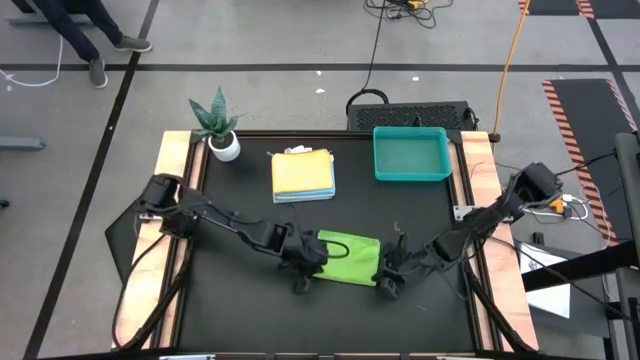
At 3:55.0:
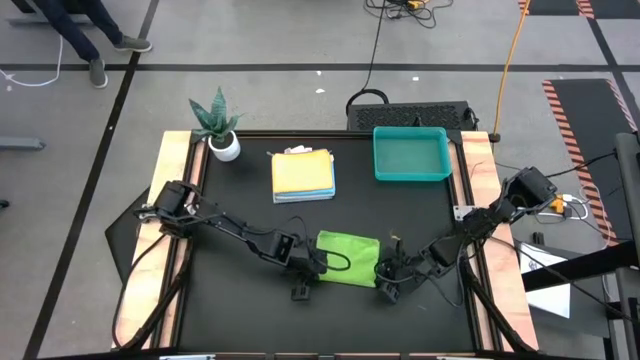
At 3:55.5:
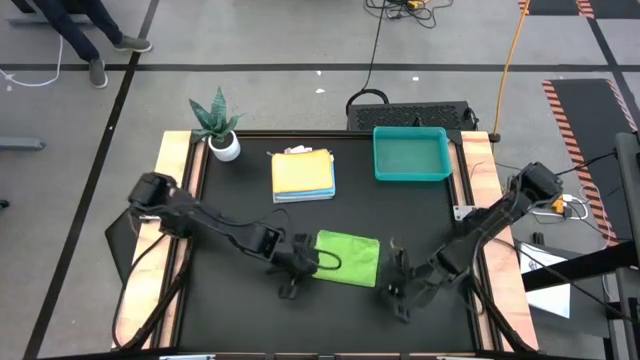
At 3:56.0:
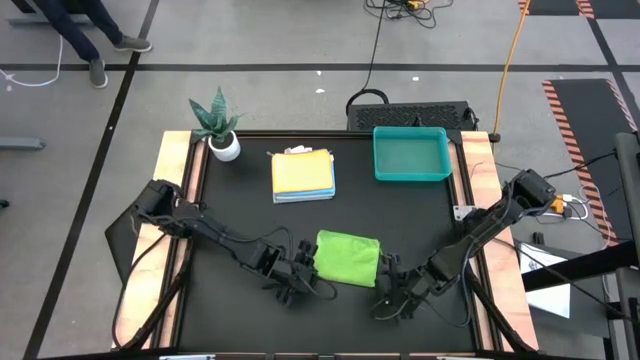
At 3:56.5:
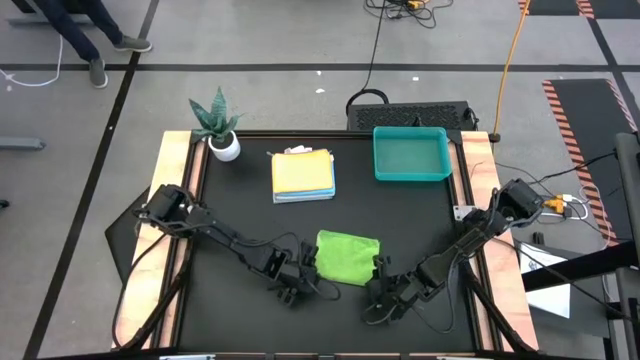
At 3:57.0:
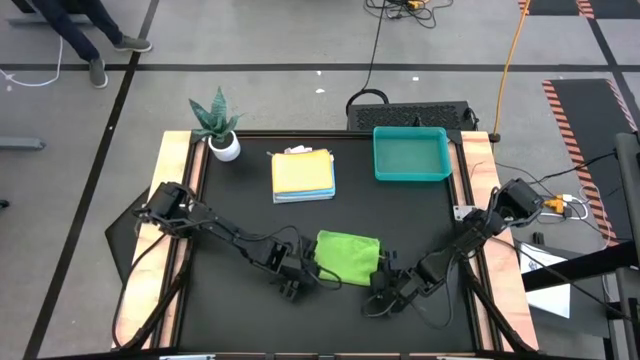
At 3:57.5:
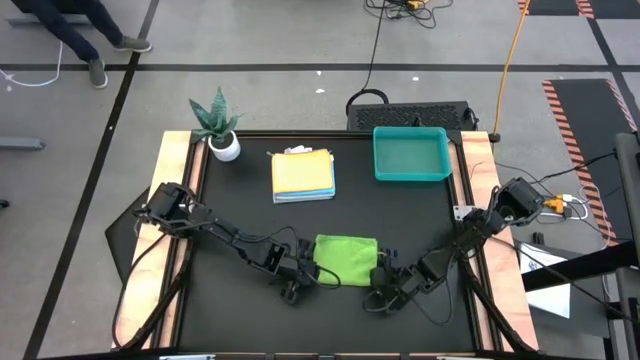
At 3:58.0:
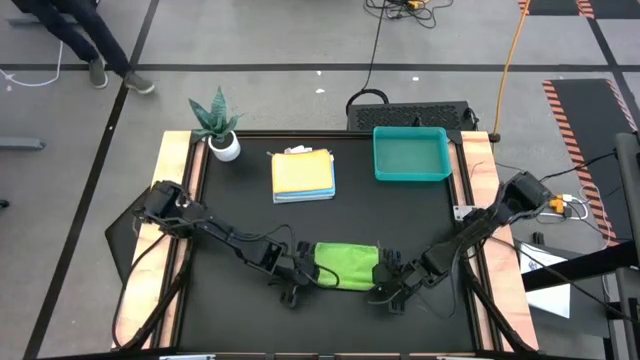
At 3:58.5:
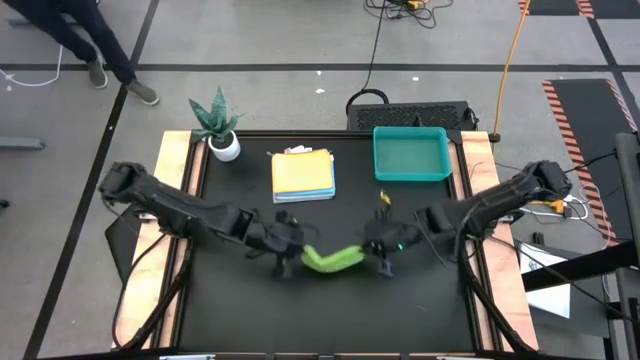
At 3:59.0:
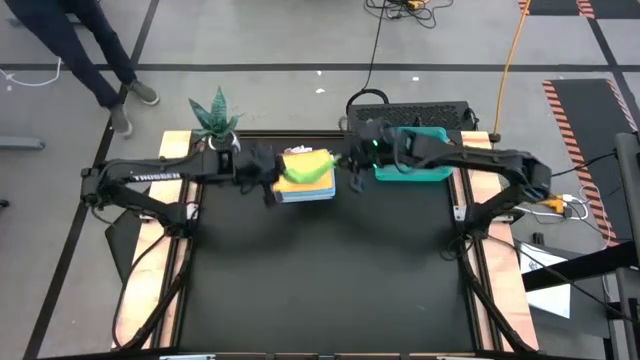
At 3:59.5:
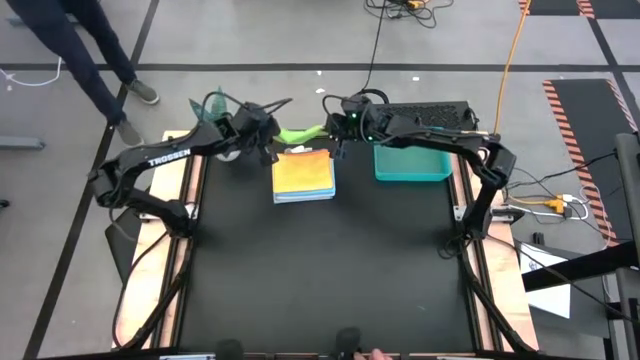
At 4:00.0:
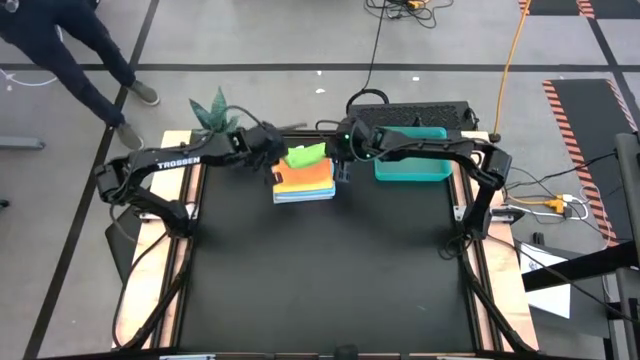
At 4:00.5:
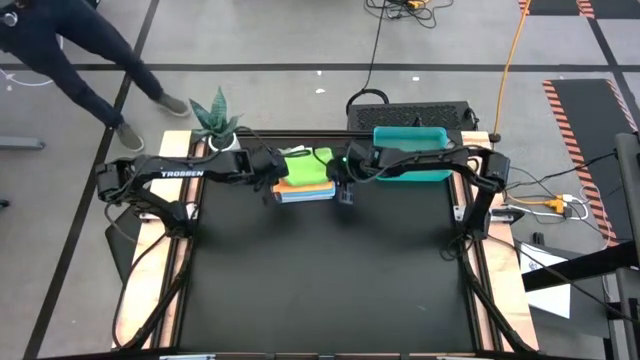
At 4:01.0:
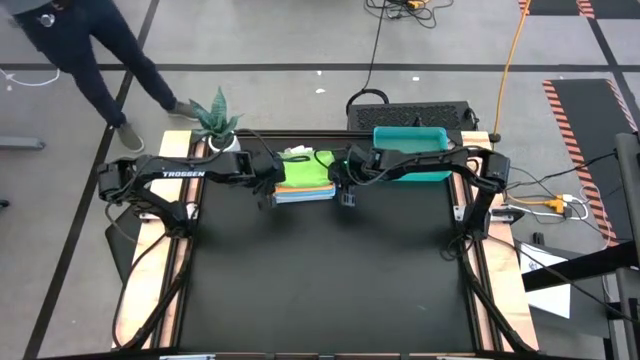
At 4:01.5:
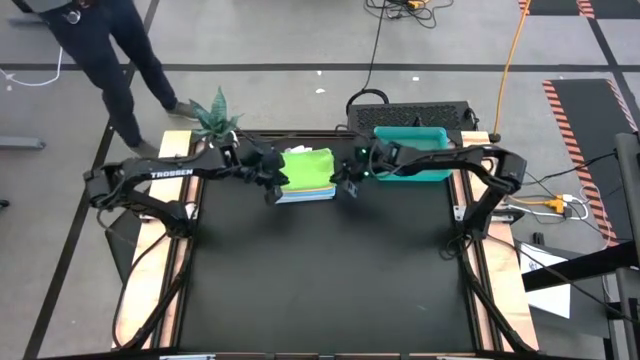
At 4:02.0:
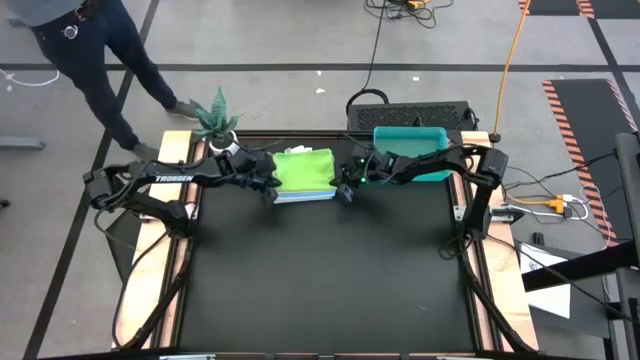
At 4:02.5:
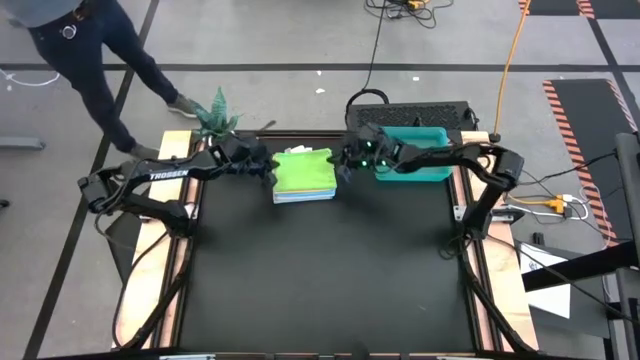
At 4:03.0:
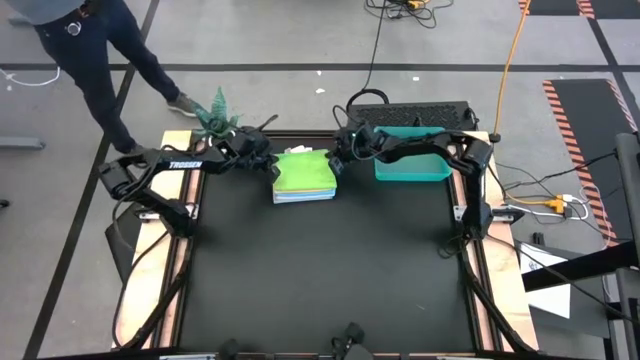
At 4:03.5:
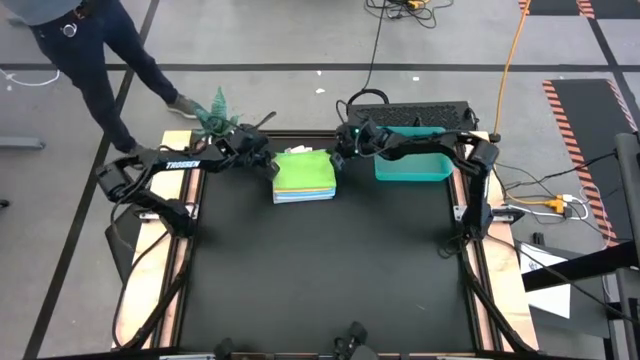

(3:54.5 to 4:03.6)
Task: Fold microfiber towels
Stack the green microfiber towel on the yellow microfiber towel

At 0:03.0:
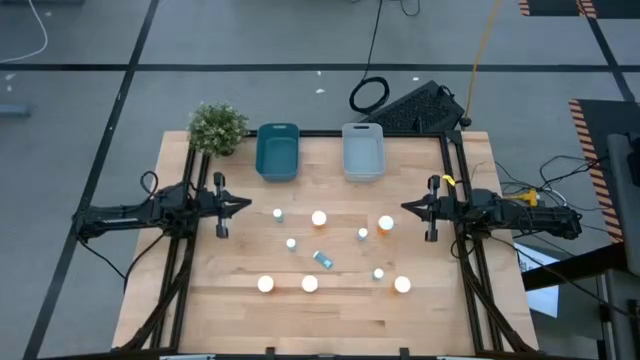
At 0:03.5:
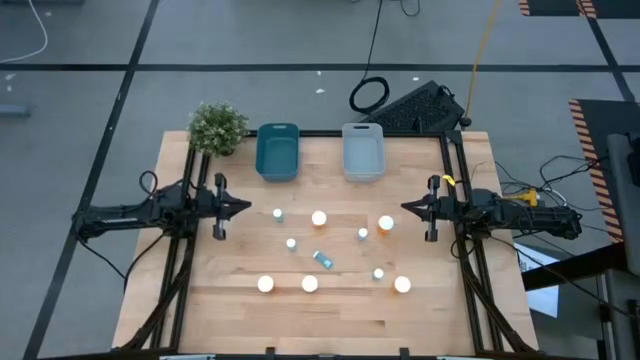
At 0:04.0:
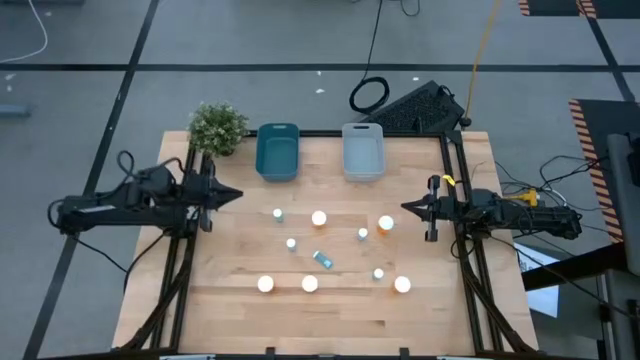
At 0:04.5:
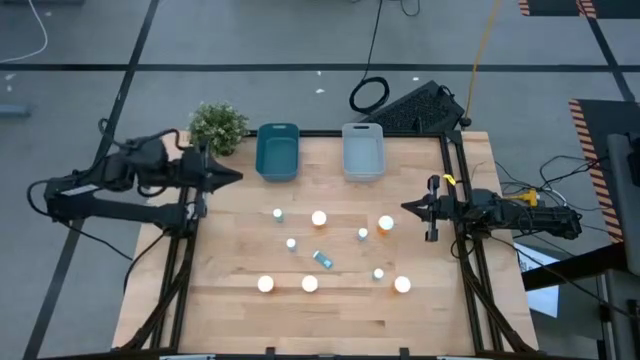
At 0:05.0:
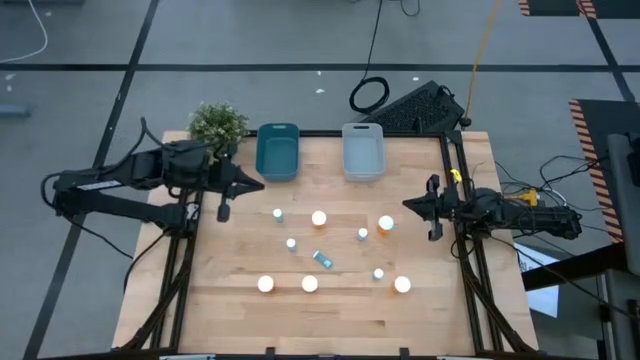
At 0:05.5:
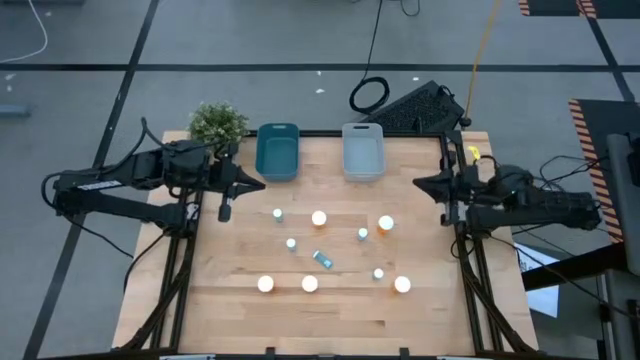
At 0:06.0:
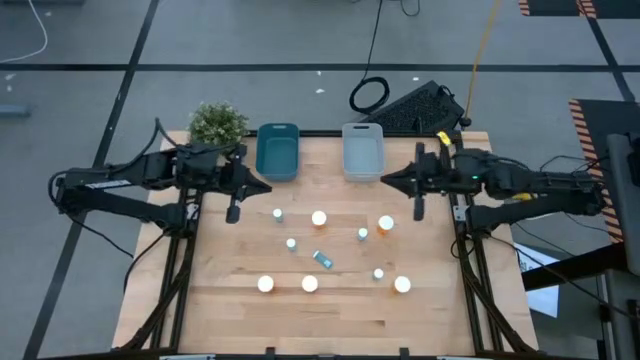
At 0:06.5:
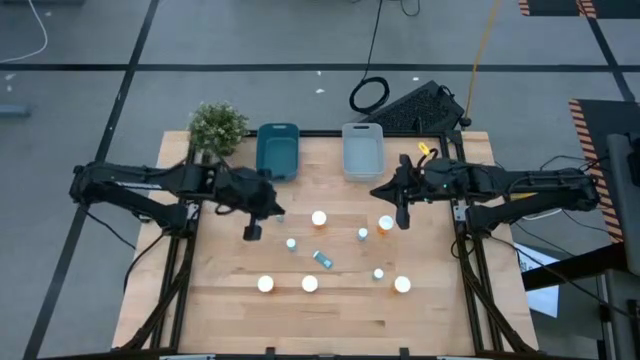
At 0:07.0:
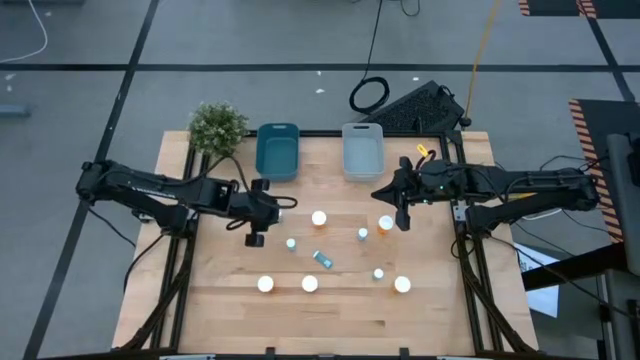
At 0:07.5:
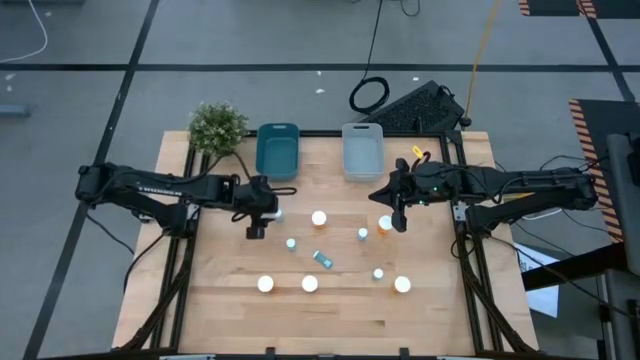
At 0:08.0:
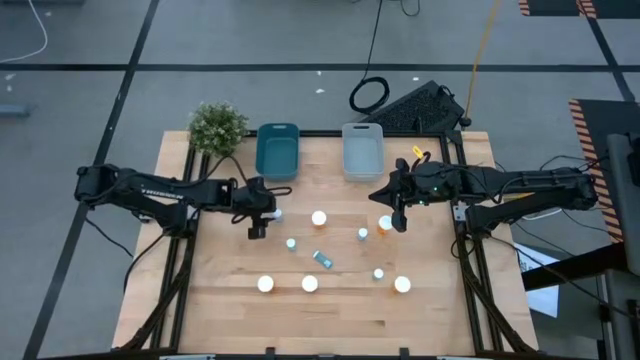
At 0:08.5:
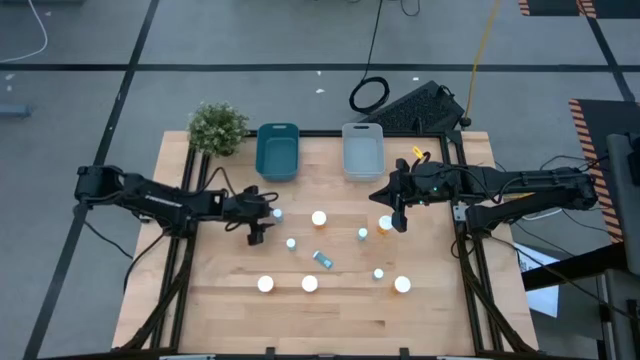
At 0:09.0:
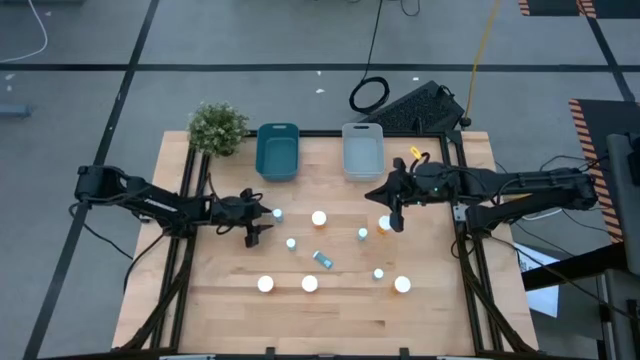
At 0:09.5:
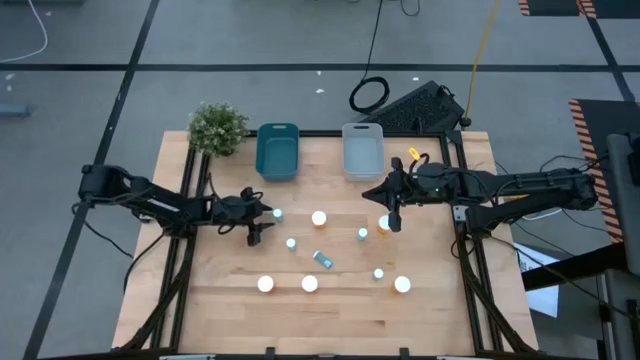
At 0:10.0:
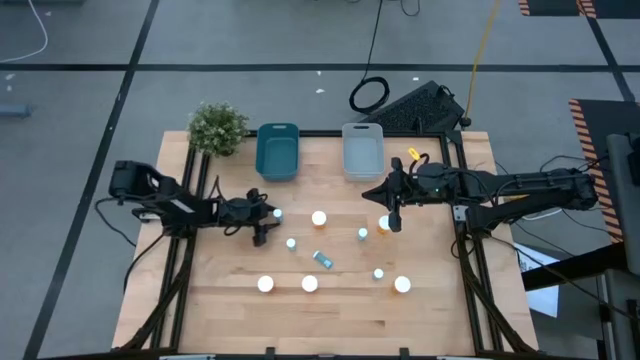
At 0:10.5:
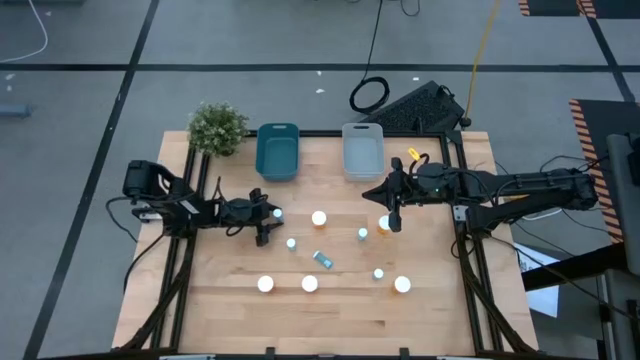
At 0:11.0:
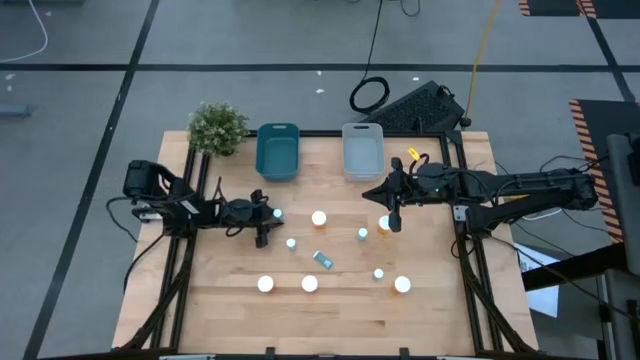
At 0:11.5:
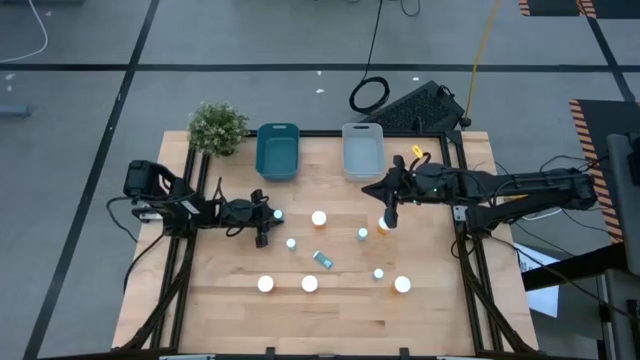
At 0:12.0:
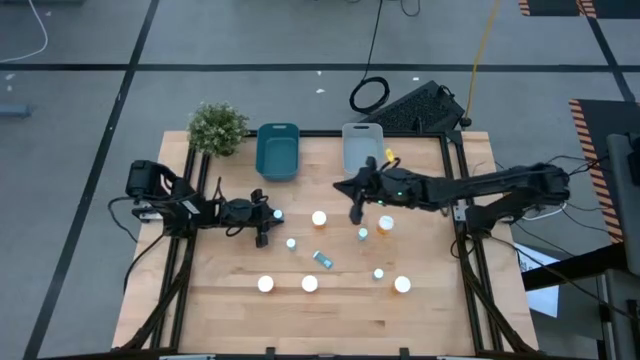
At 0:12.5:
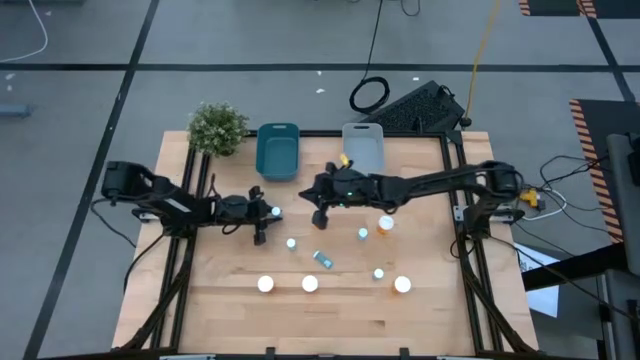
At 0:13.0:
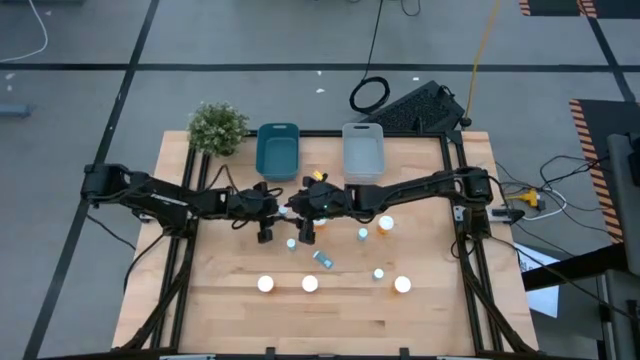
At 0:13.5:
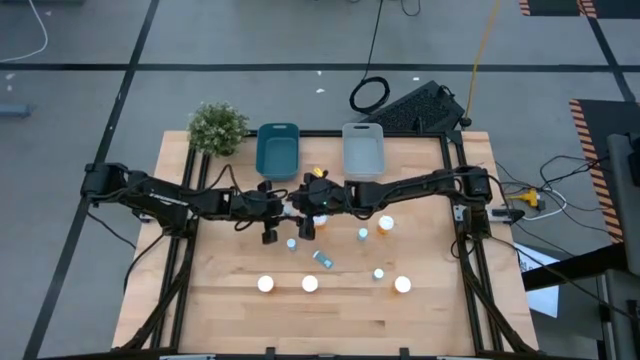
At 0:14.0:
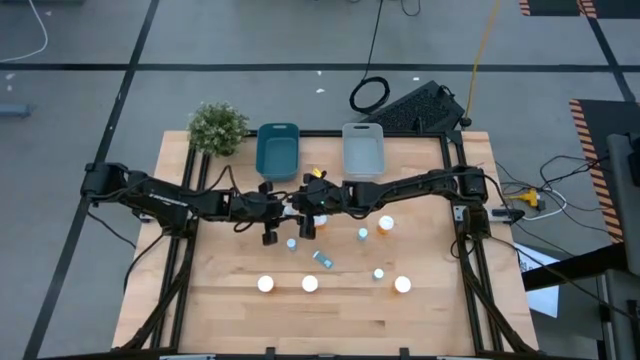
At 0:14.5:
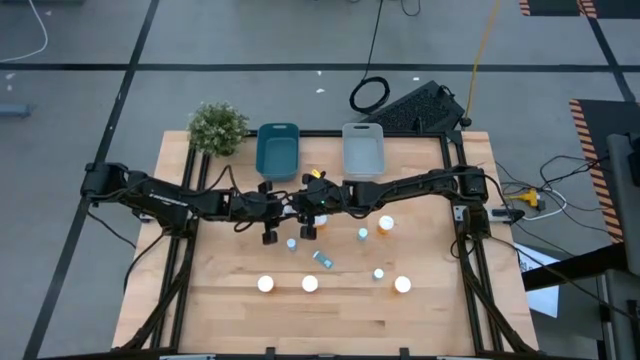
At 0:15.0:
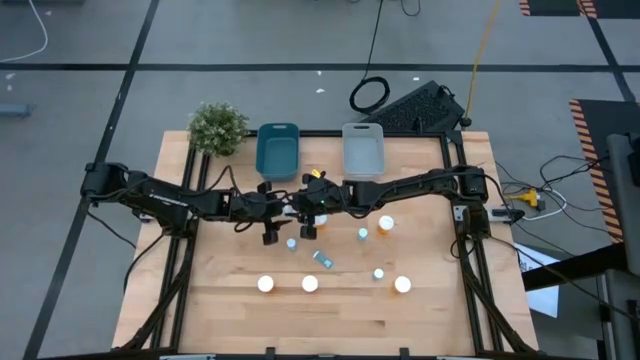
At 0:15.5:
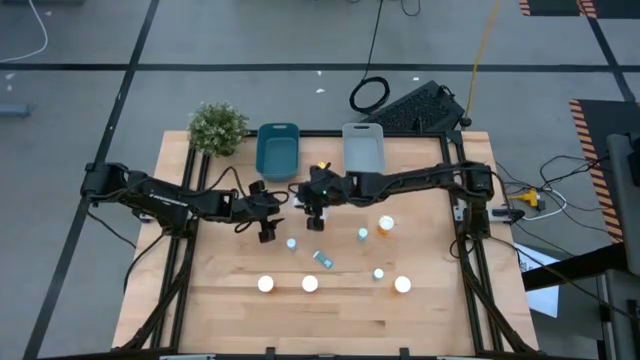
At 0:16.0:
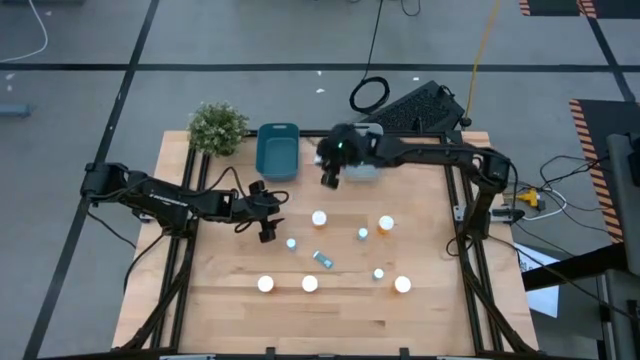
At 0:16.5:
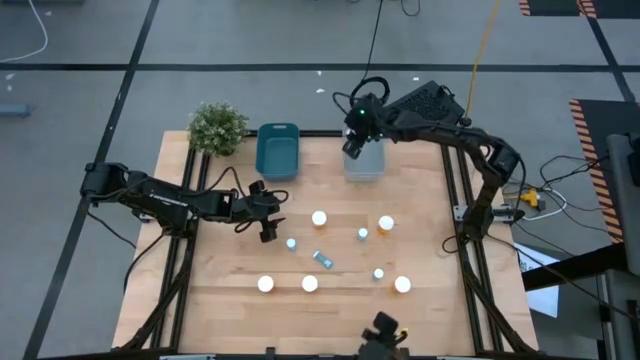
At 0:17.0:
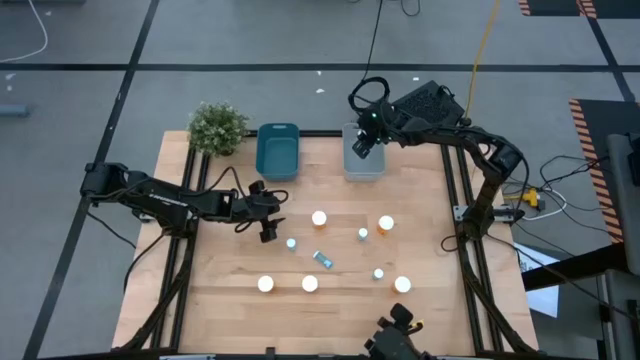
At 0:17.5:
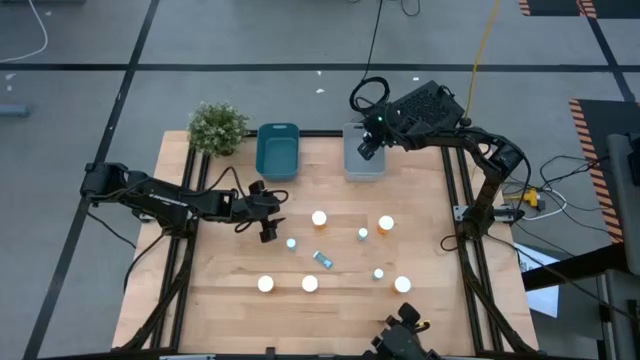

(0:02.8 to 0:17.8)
Task: Pick and place medicine bottles into bin by pill shape (circle, oval)
Put the blue pill bottle into the gray bin
